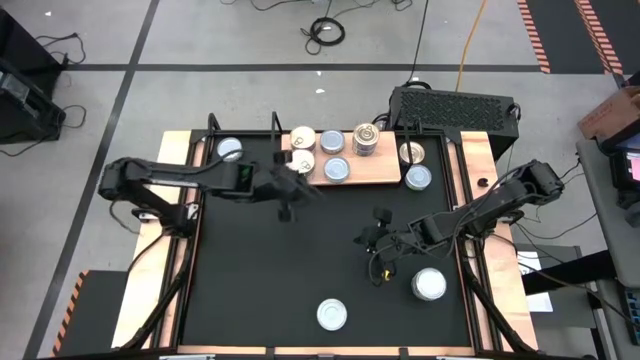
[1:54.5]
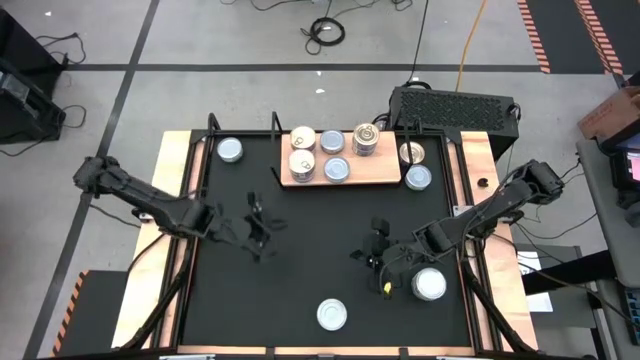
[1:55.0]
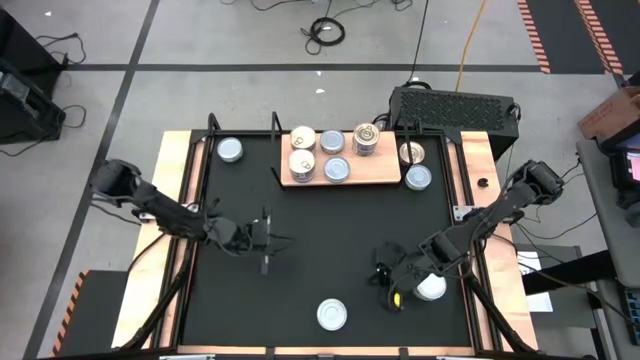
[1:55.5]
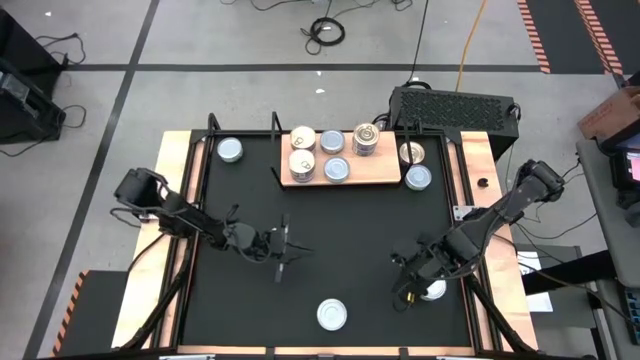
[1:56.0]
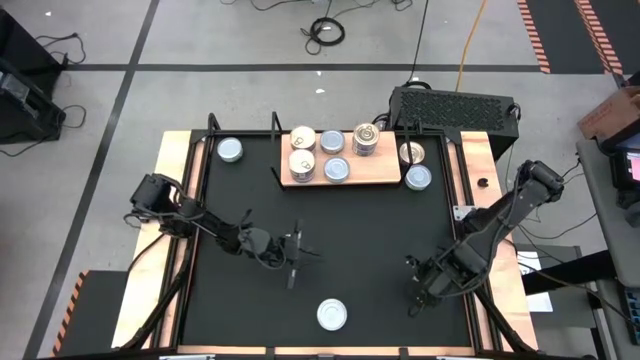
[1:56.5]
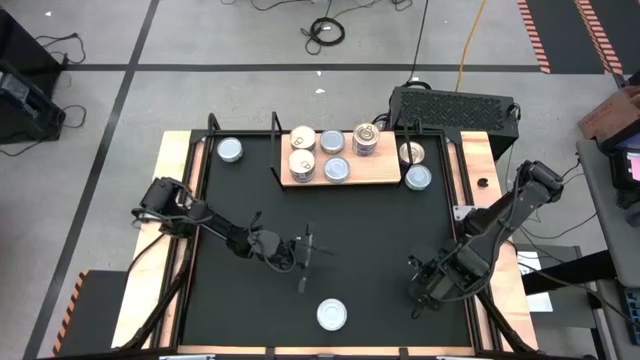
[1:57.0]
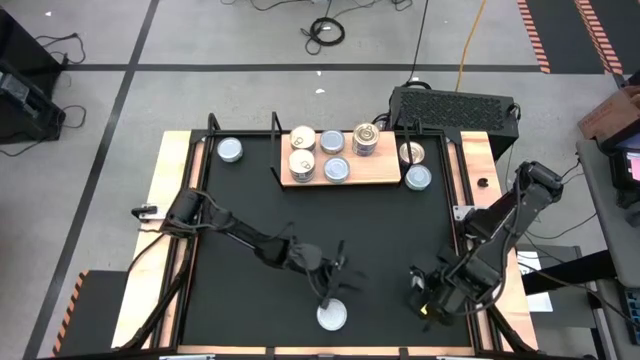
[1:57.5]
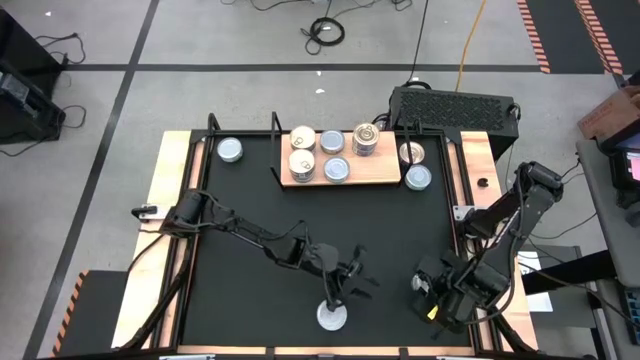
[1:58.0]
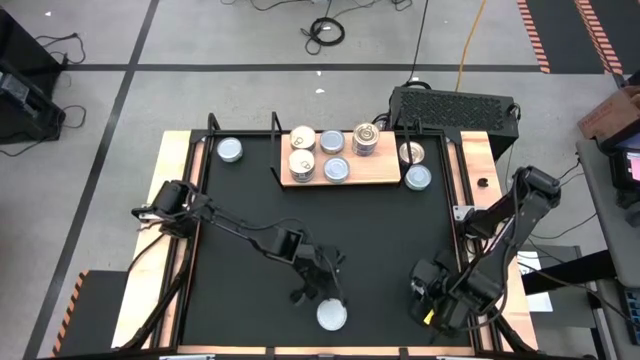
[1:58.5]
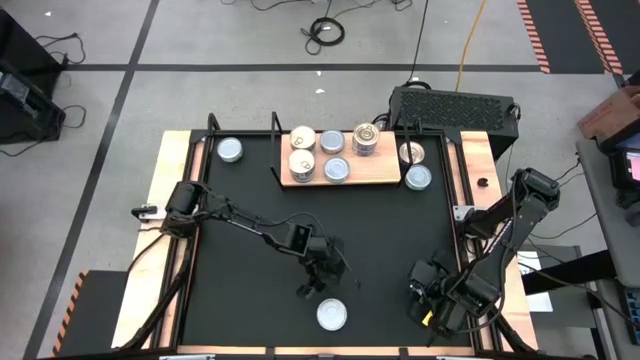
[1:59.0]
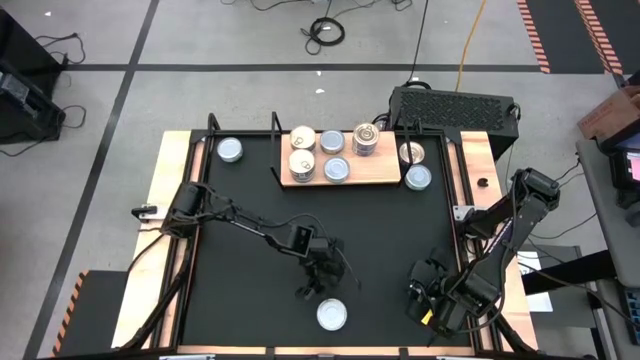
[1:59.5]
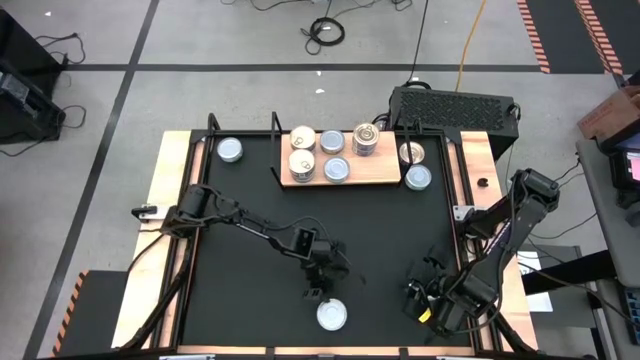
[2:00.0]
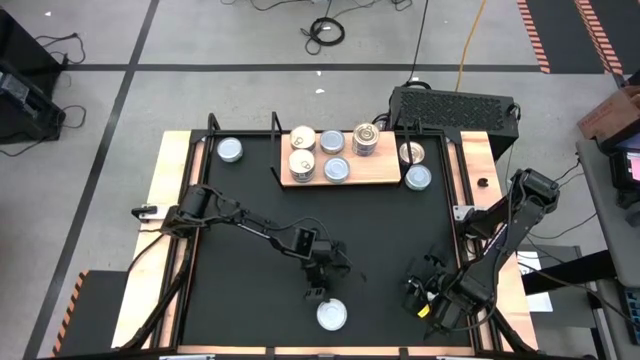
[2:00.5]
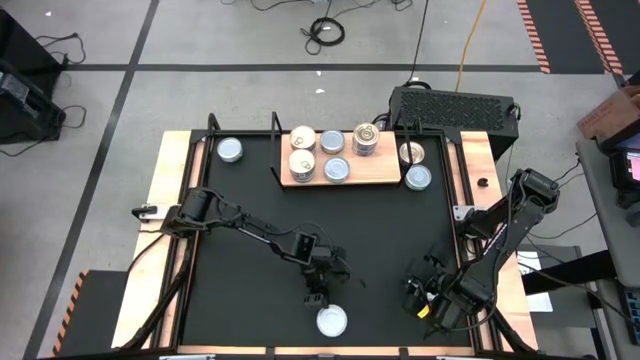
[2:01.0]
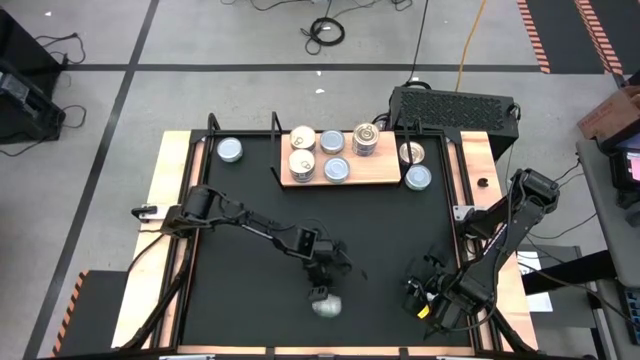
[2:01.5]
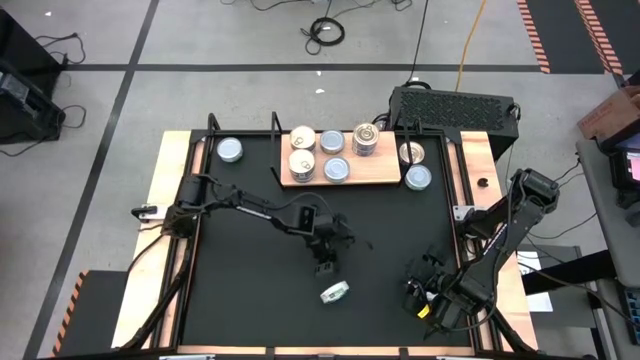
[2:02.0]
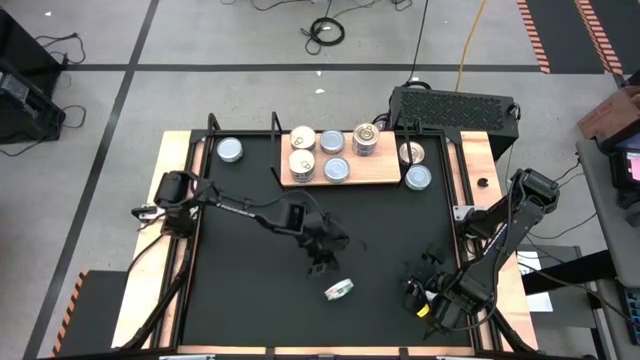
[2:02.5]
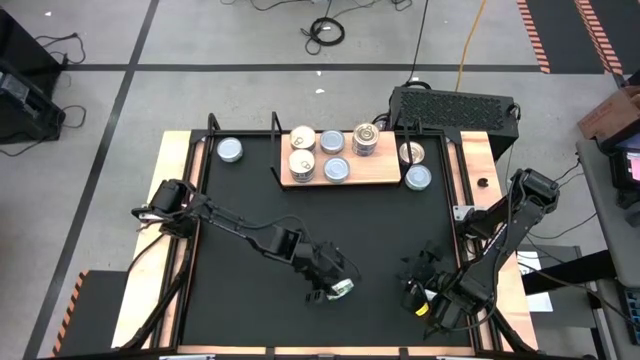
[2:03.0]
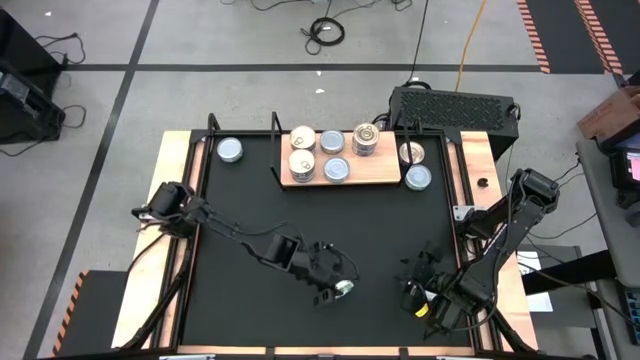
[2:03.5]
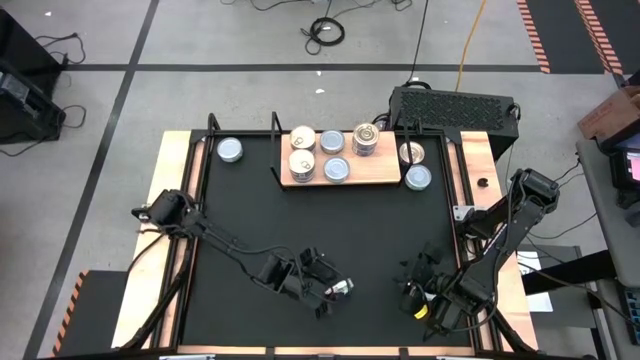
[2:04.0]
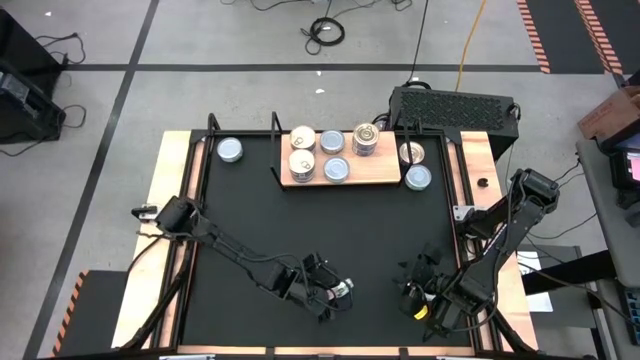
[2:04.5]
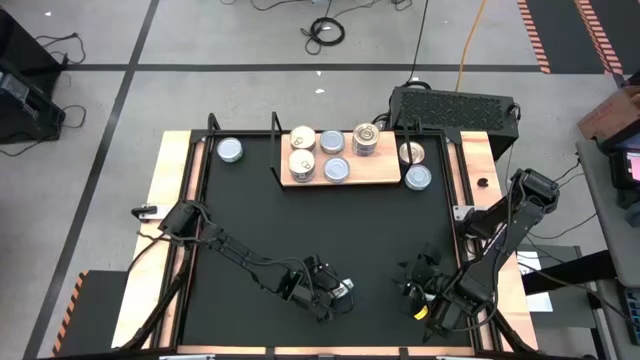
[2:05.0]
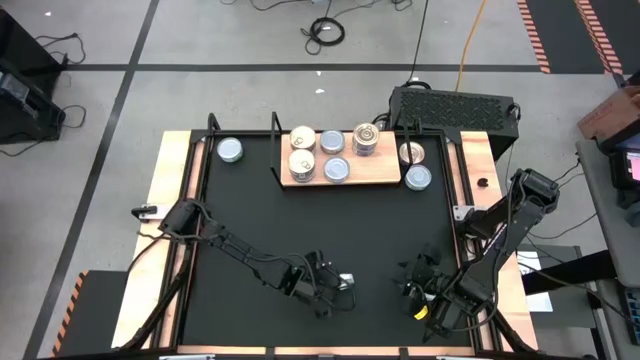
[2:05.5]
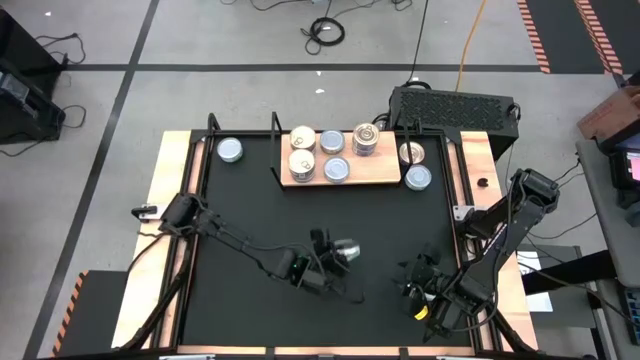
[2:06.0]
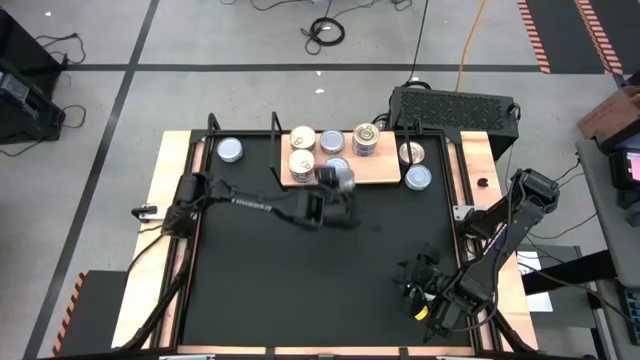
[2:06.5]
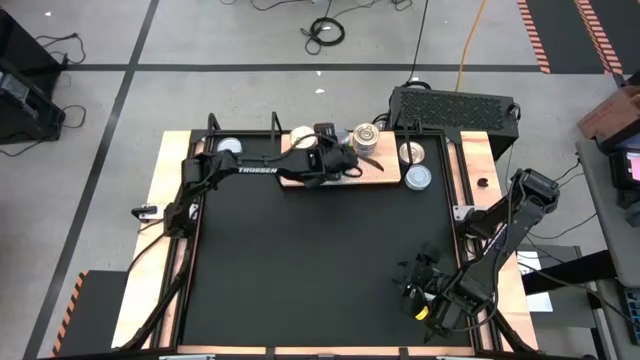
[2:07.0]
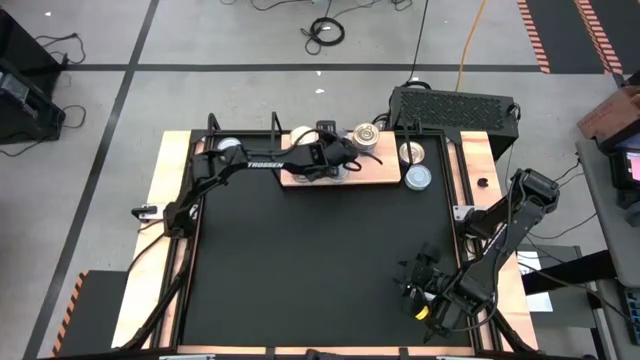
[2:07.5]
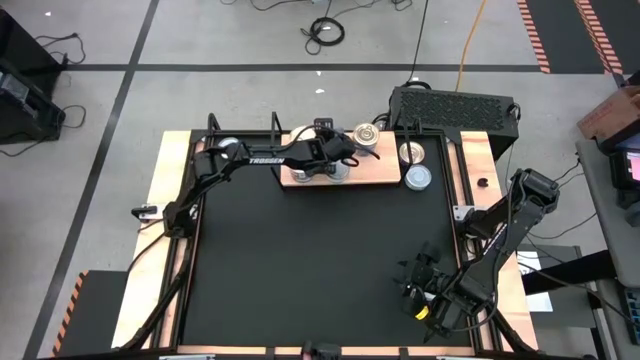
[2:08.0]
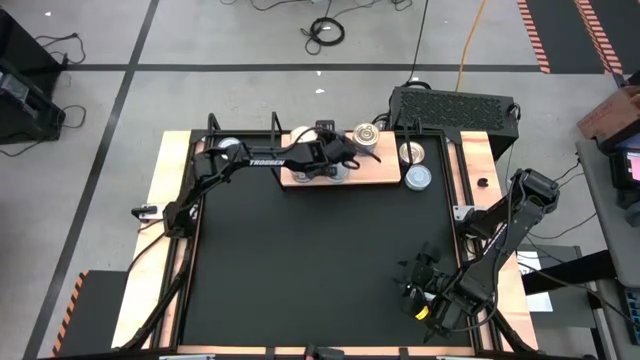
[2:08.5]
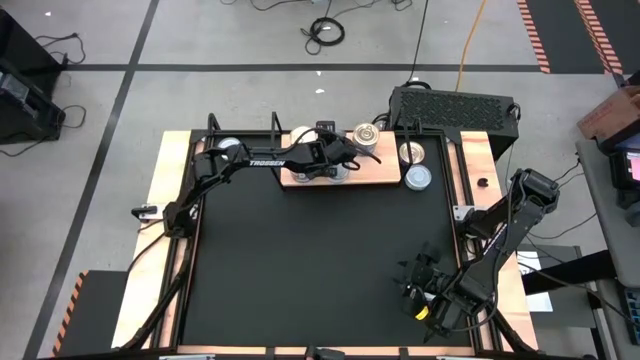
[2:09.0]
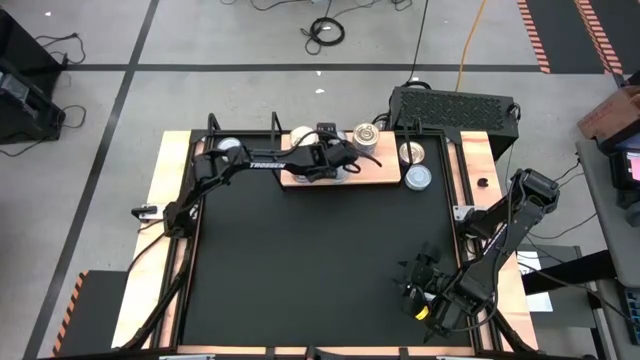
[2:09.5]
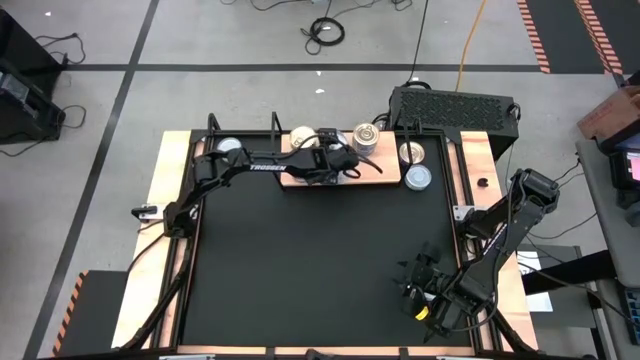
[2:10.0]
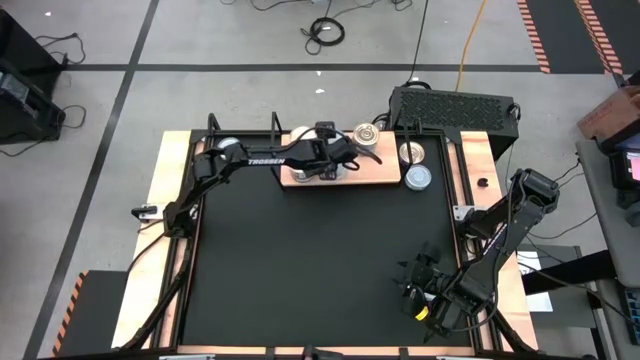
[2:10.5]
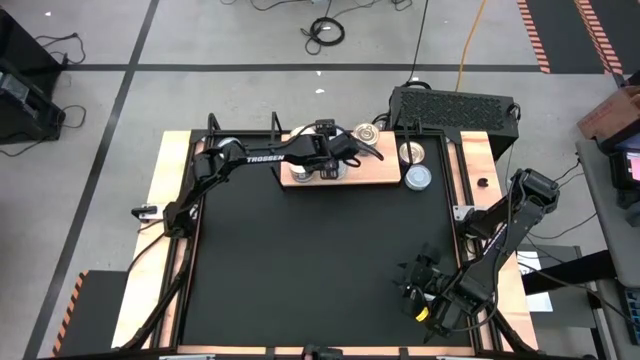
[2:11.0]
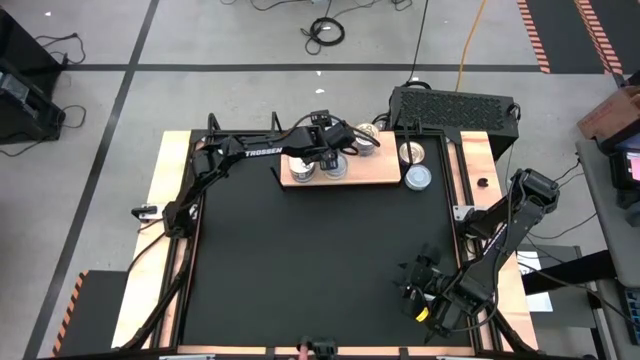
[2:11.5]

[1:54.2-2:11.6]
Task: Stack canned seafood by type on shelf
Stack the bottom center green tuna can on top of the green tuna can on the shelf
